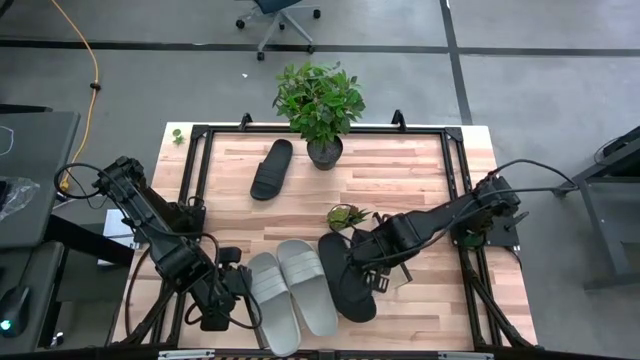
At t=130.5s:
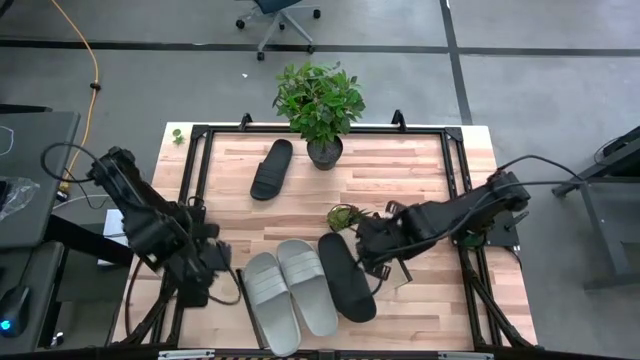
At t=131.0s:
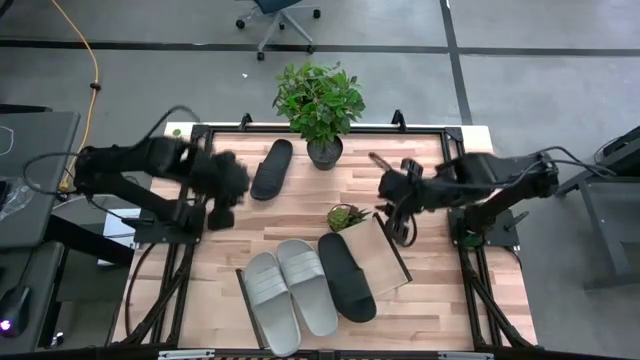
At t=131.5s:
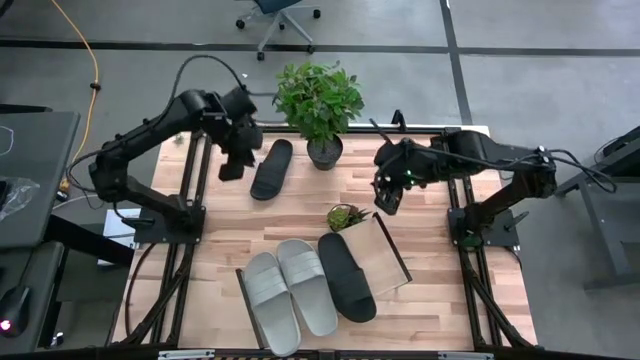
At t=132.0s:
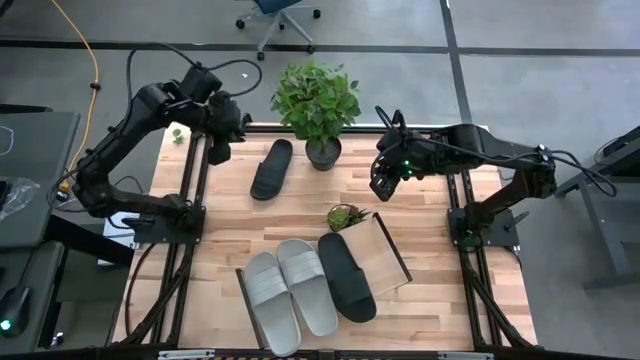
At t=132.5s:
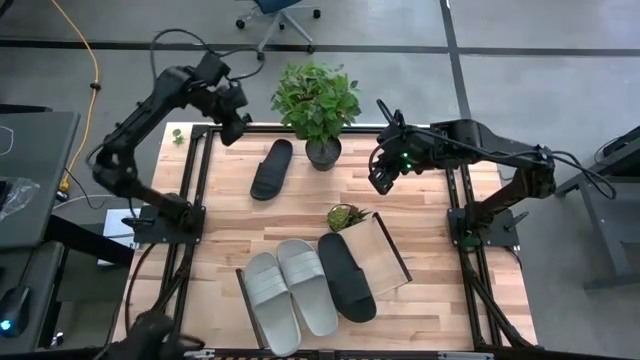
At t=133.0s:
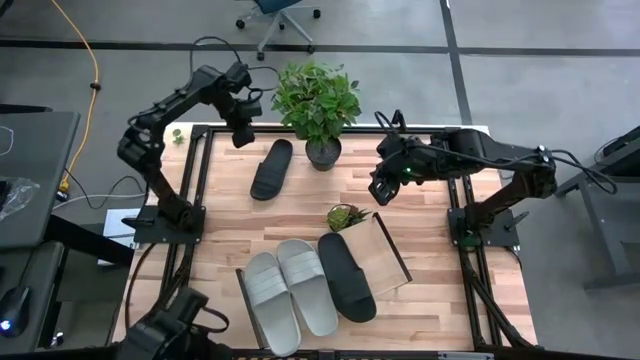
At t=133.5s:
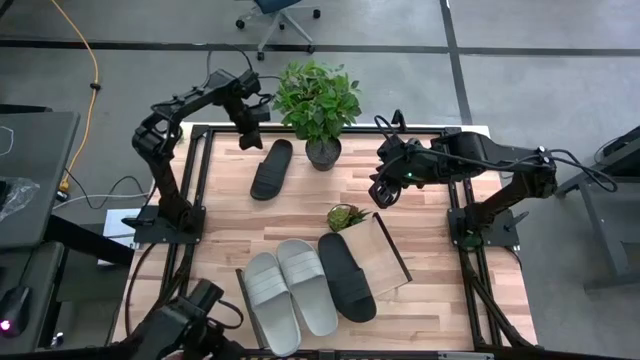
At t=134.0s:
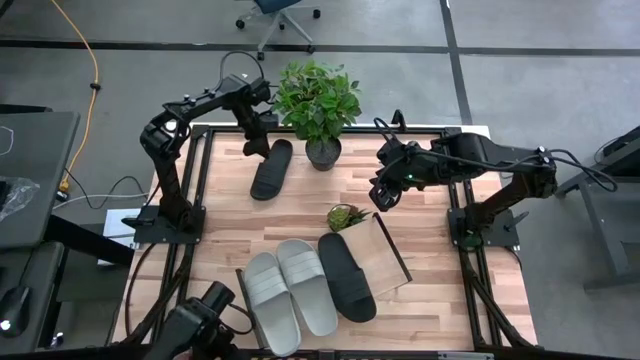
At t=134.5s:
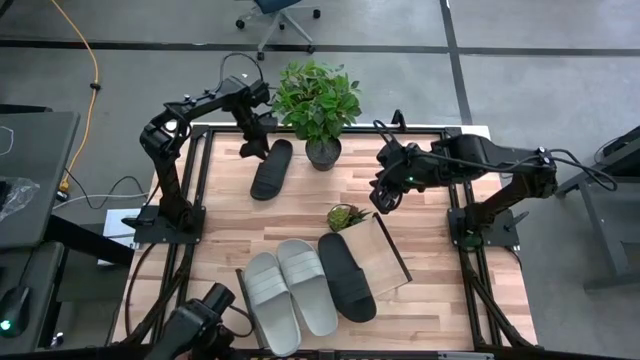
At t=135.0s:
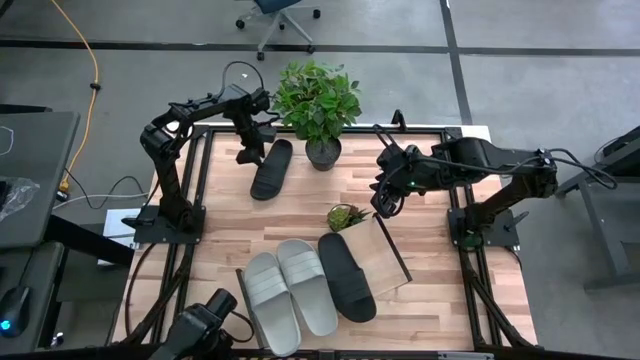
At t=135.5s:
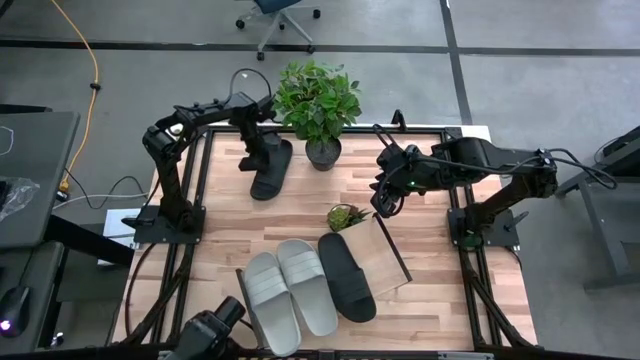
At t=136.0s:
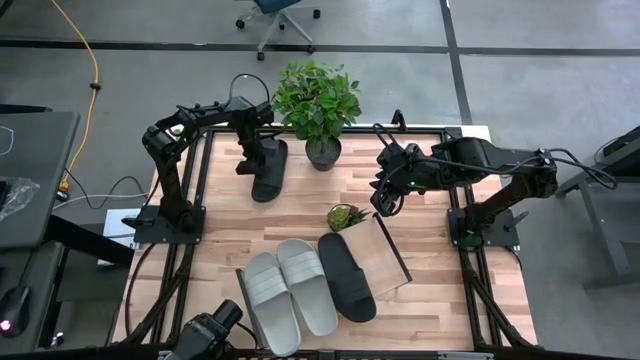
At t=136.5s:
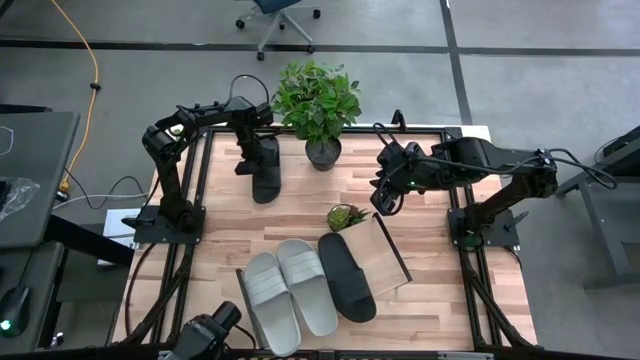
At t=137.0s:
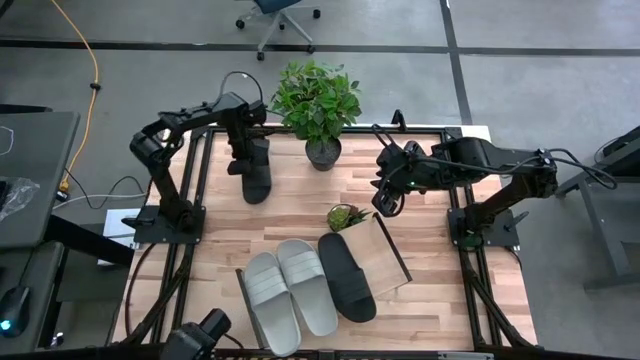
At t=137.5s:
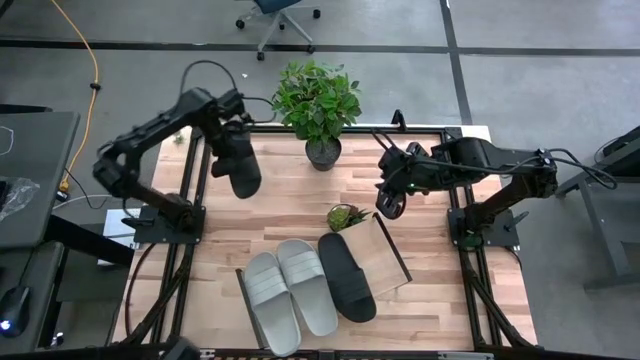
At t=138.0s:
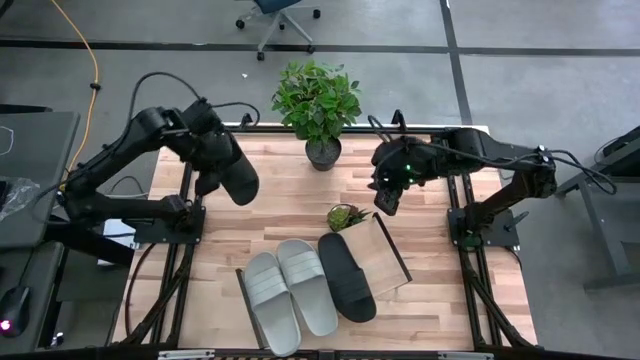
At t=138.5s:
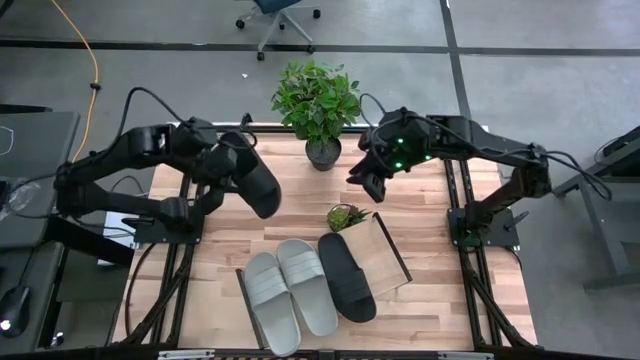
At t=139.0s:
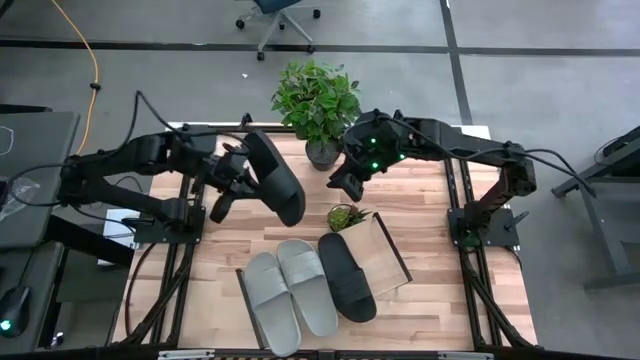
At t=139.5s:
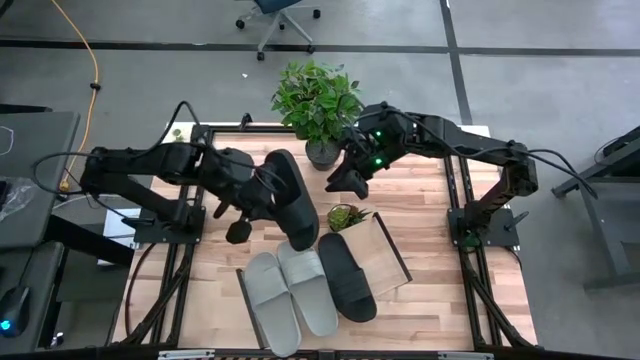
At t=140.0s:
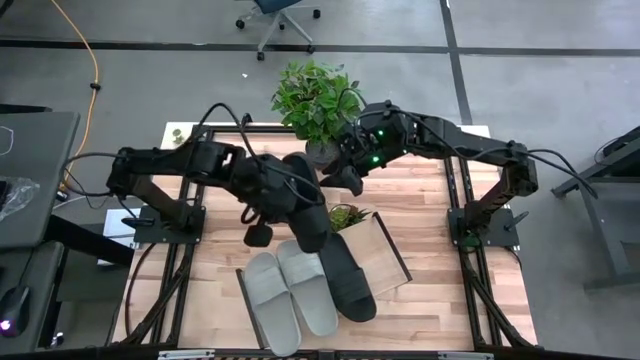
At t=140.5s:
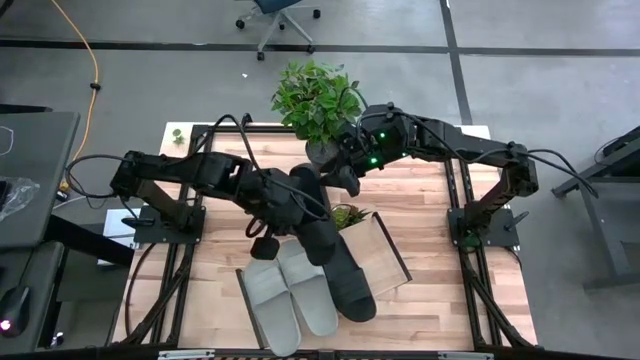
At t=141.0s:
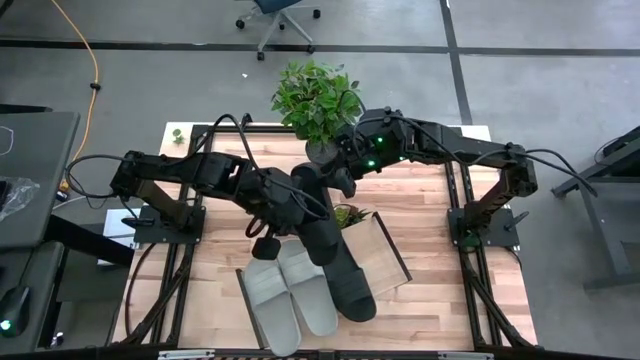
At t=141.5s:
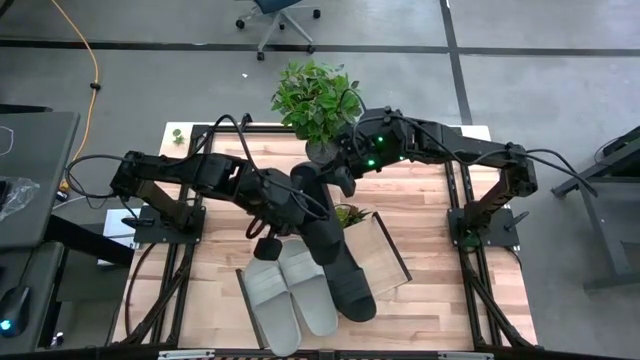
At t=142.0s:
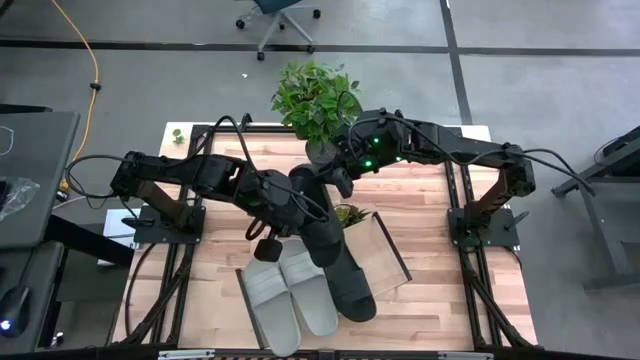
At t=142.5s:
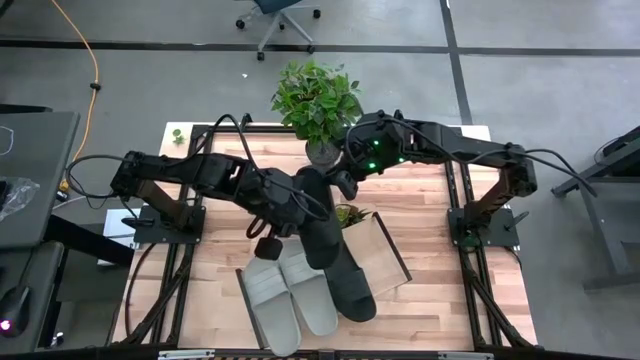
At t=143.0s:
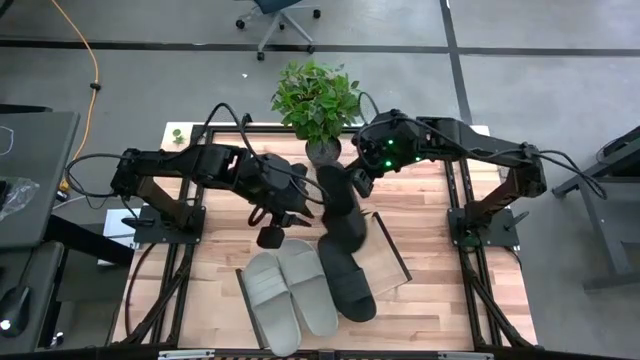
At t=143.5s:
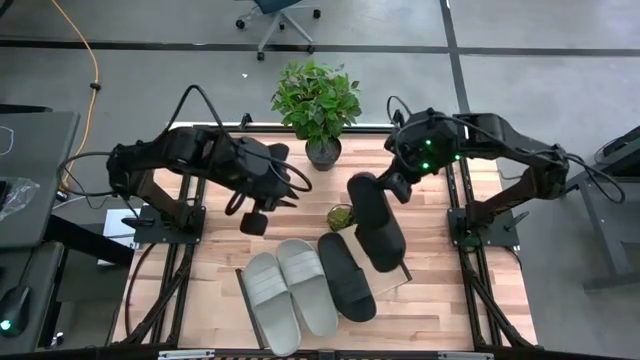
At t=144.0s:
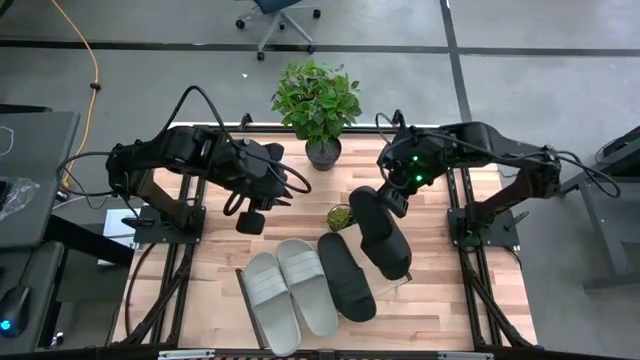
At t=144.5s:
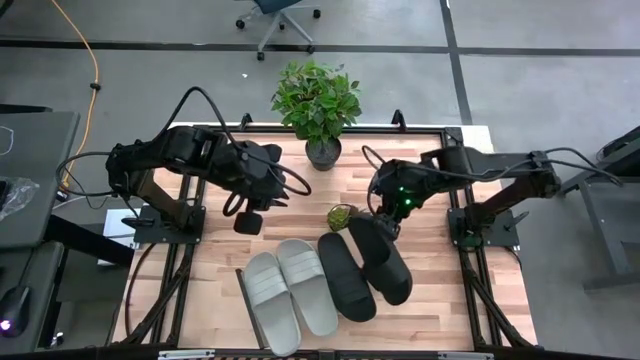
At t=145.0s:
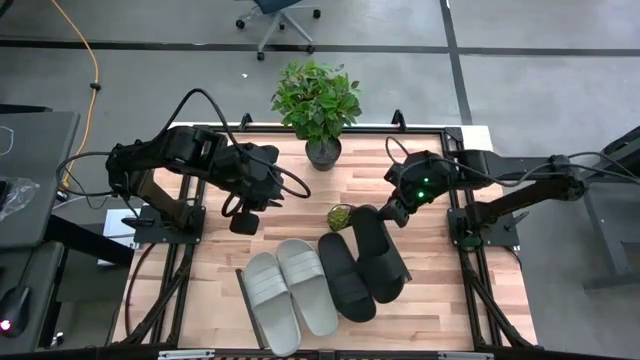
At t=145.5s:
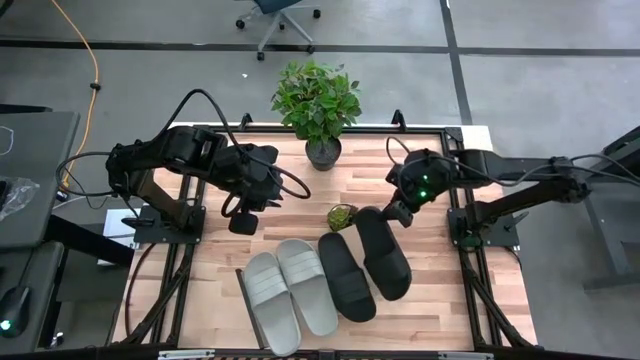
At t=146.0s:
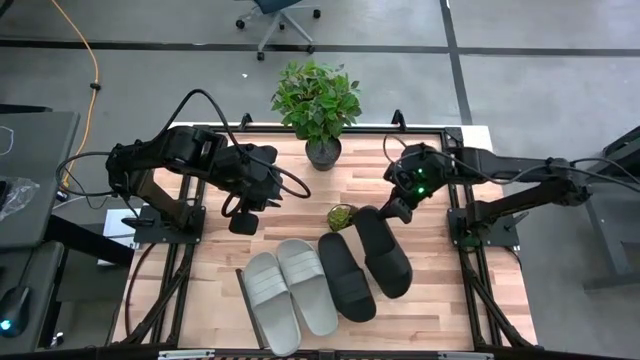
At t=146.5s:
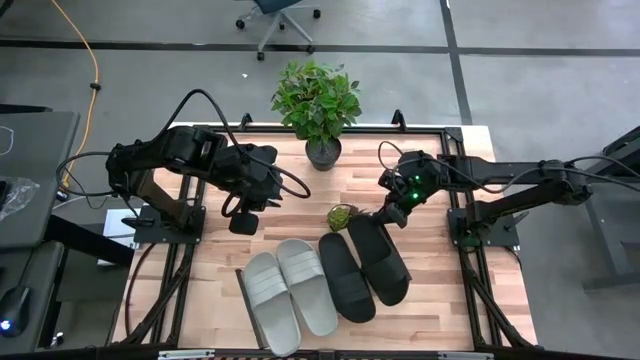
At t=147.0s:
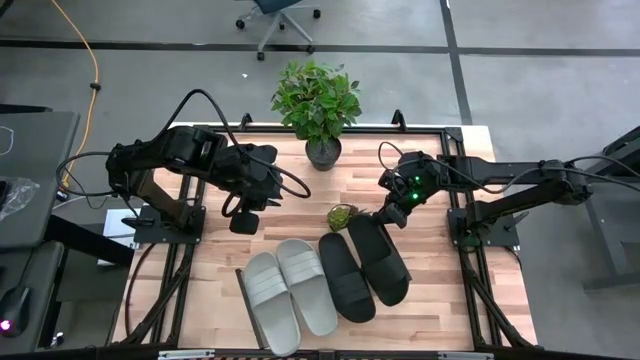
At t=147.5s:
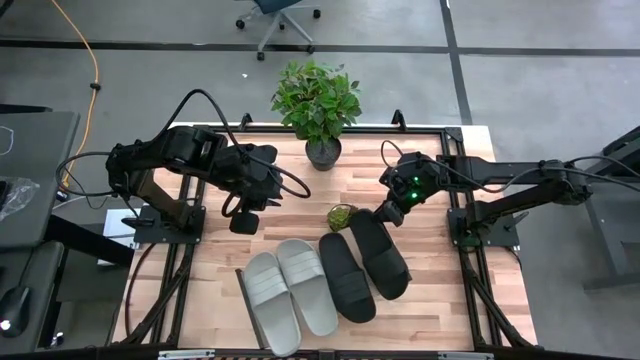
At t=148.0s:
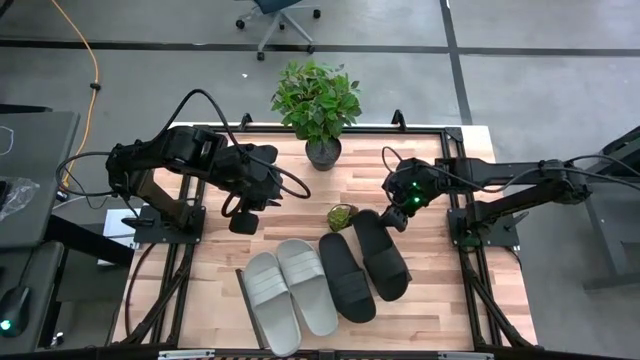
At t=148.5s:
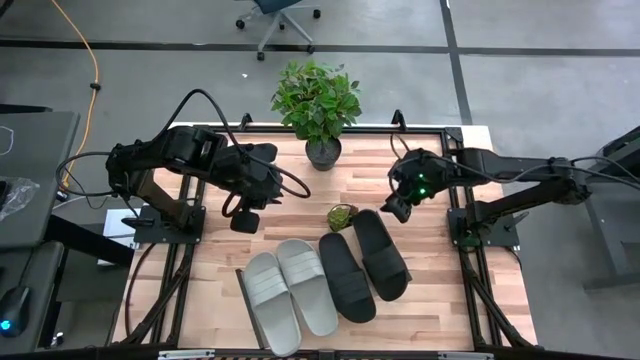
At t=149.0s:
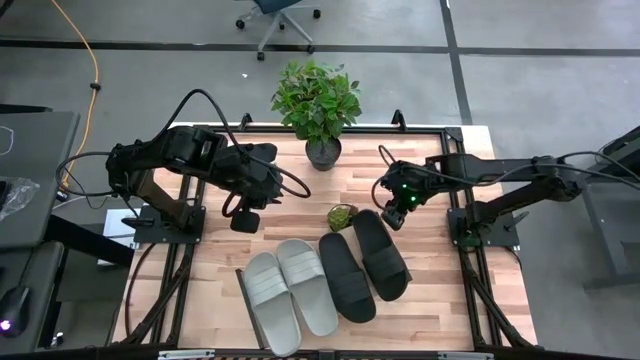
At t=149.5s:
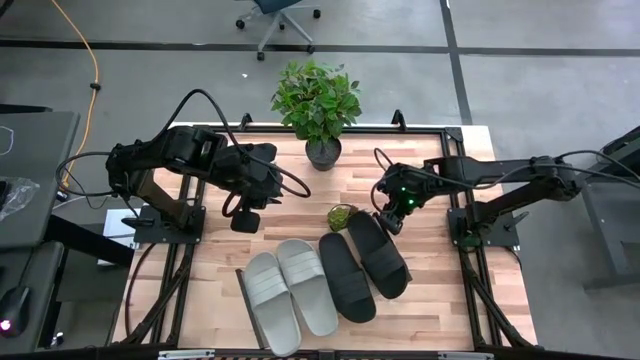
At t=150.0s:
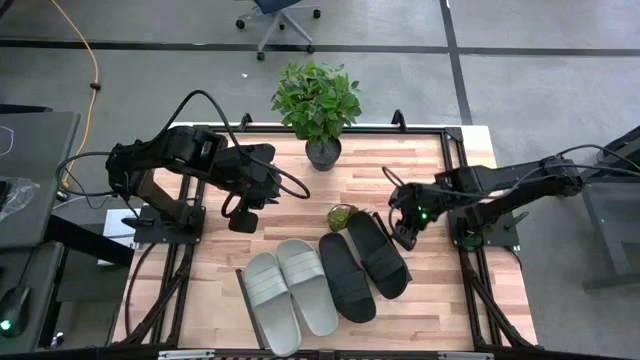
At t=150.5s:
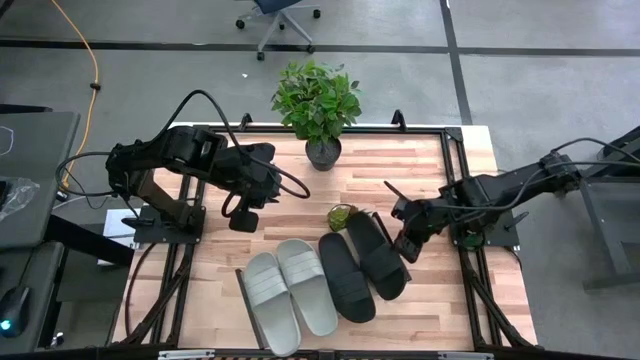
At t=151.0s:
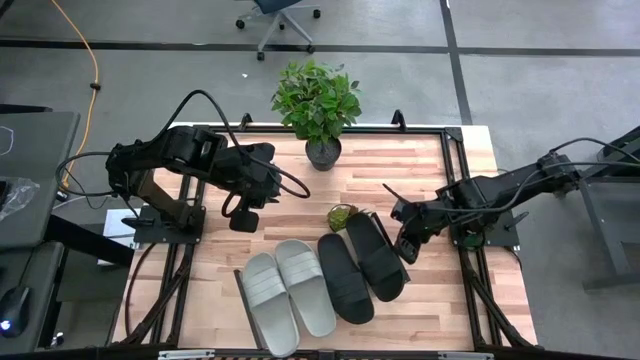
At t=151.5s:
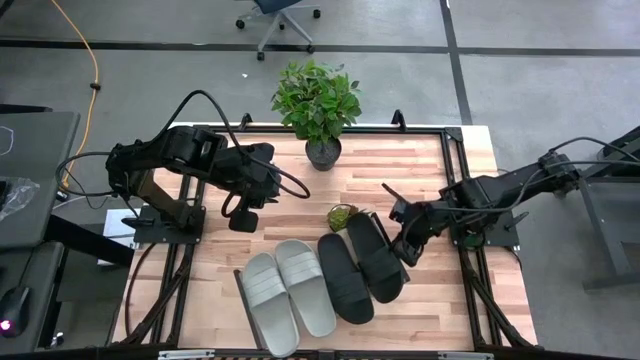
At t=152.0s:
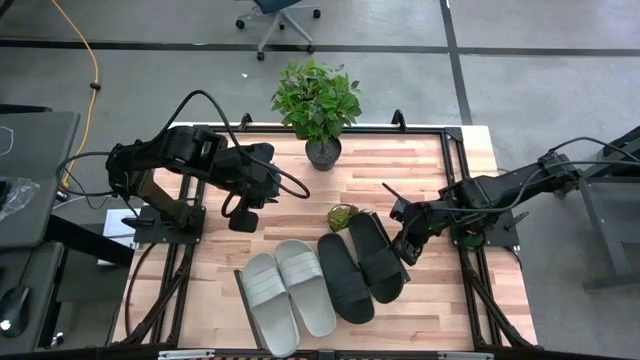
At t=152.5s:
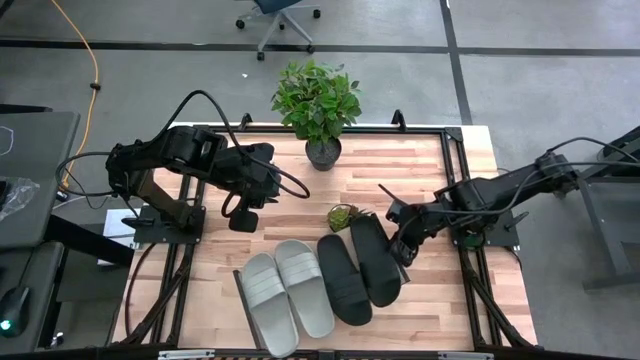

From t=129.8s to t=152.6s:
Task: Pick and place slides into the shelf
Put the black slipper on the shelf
